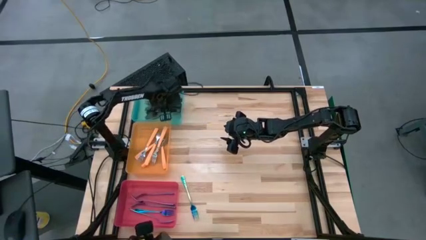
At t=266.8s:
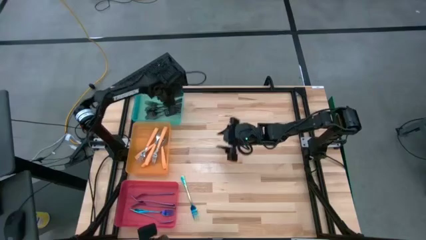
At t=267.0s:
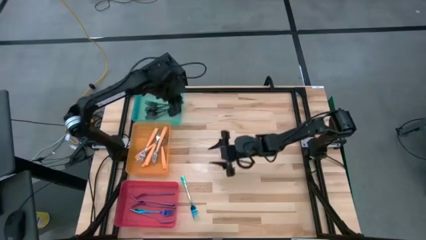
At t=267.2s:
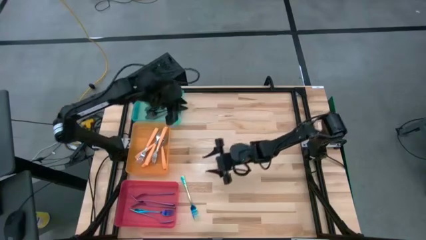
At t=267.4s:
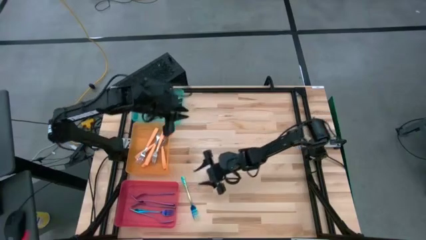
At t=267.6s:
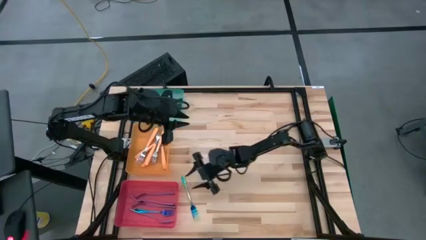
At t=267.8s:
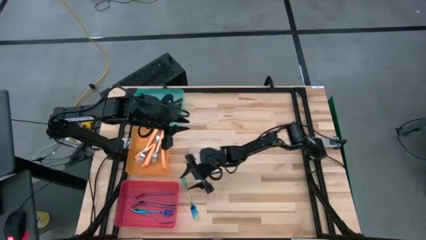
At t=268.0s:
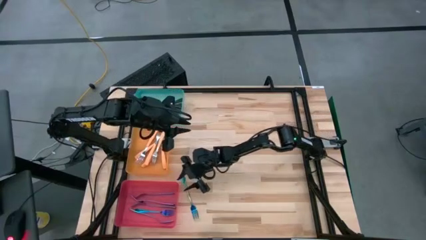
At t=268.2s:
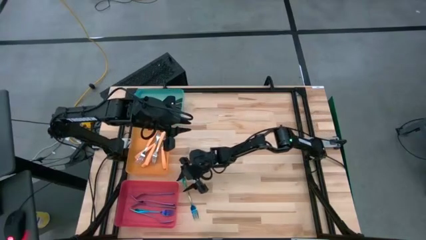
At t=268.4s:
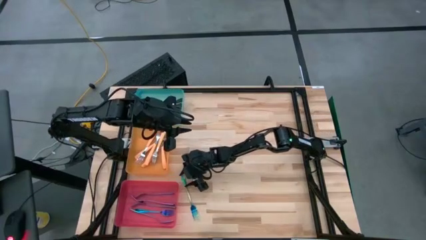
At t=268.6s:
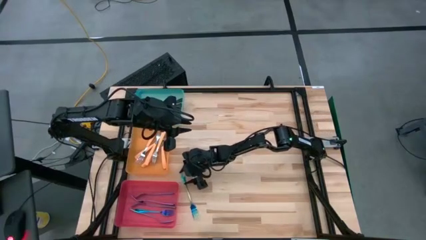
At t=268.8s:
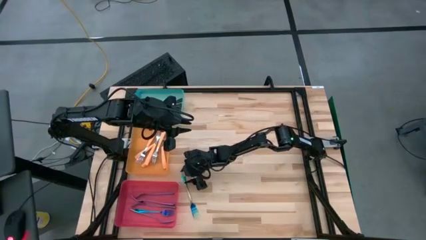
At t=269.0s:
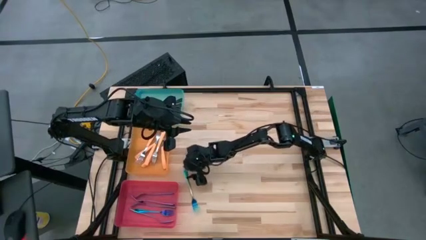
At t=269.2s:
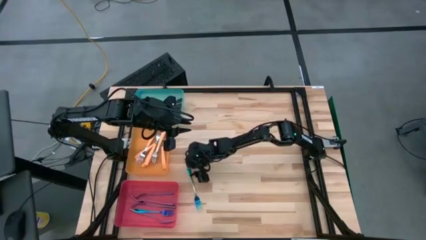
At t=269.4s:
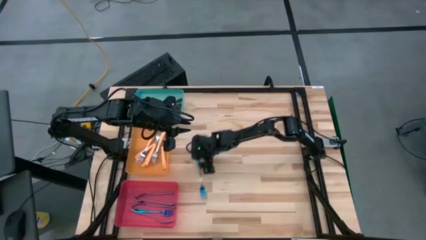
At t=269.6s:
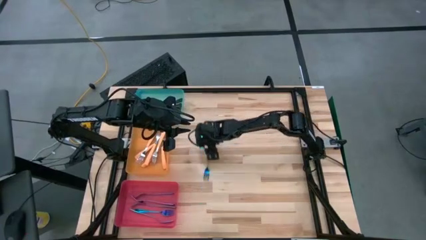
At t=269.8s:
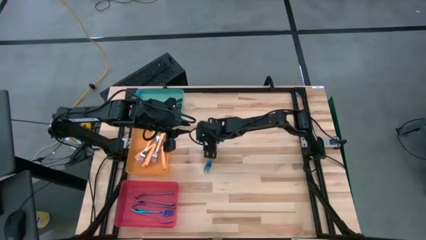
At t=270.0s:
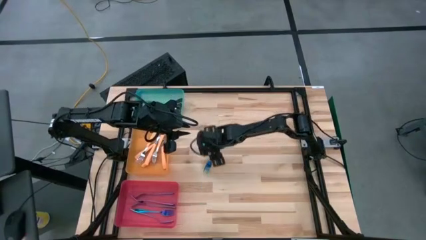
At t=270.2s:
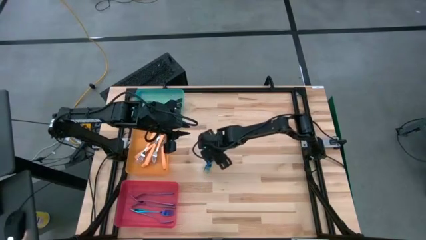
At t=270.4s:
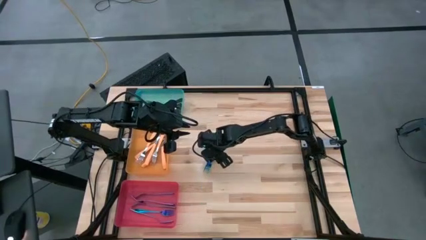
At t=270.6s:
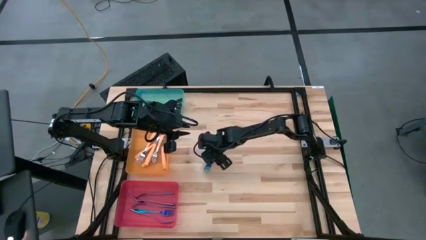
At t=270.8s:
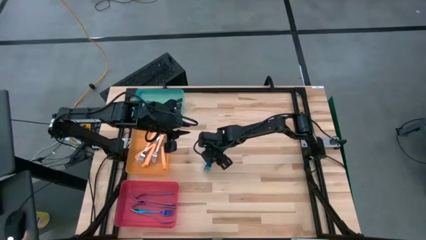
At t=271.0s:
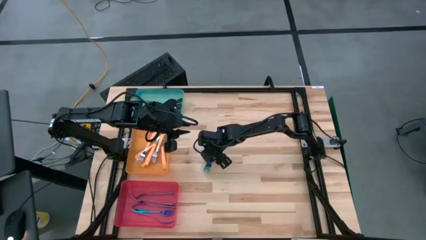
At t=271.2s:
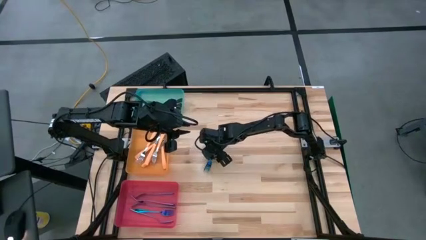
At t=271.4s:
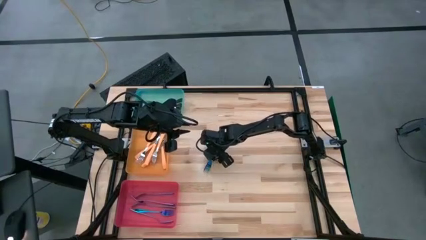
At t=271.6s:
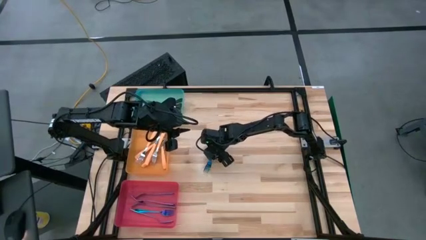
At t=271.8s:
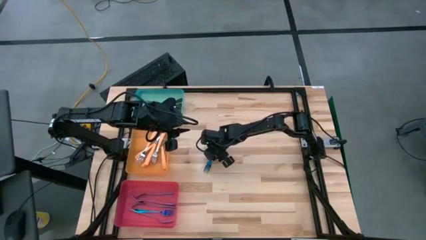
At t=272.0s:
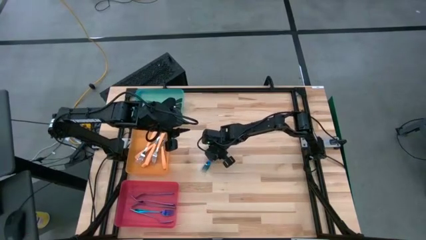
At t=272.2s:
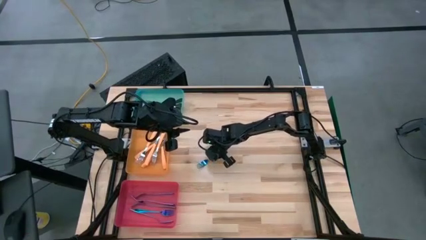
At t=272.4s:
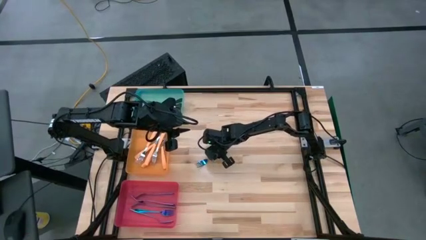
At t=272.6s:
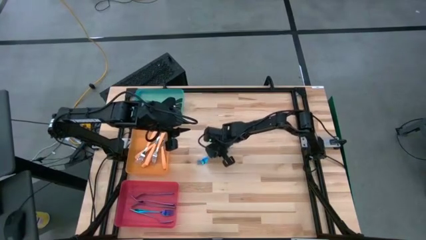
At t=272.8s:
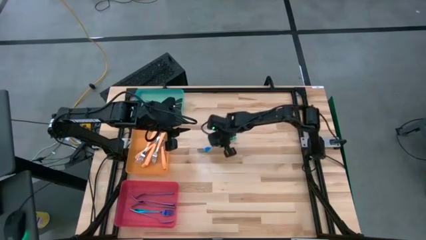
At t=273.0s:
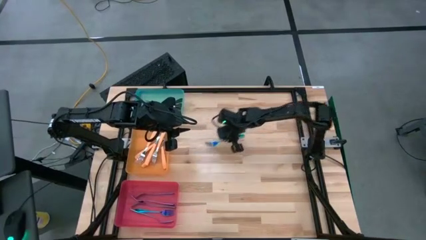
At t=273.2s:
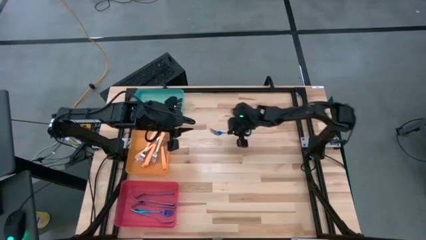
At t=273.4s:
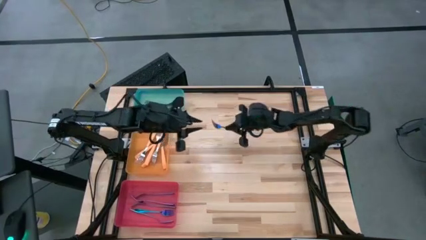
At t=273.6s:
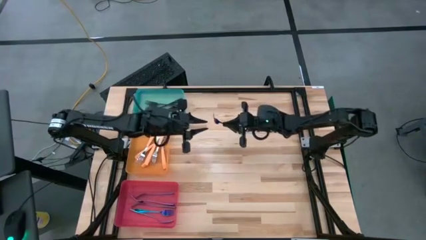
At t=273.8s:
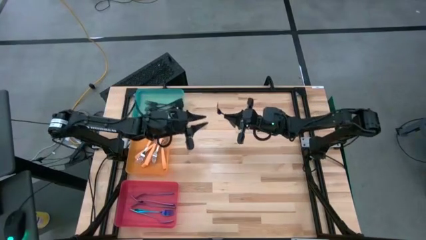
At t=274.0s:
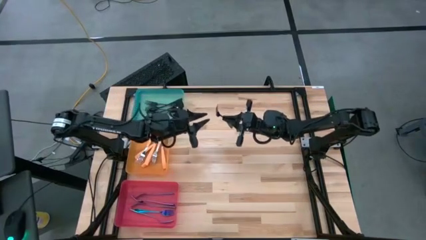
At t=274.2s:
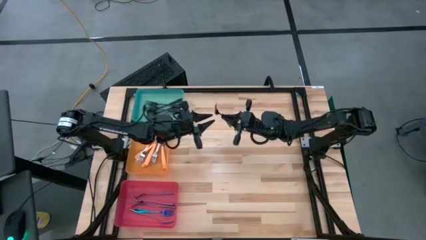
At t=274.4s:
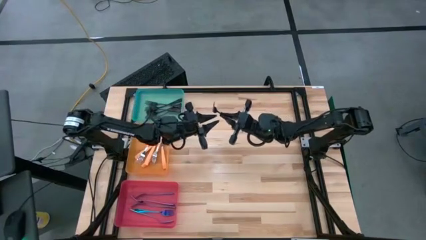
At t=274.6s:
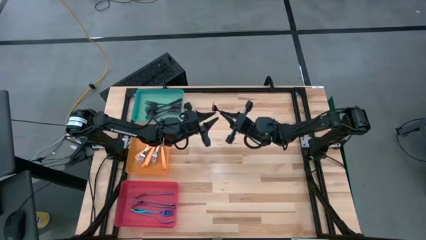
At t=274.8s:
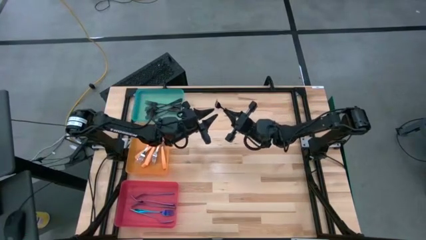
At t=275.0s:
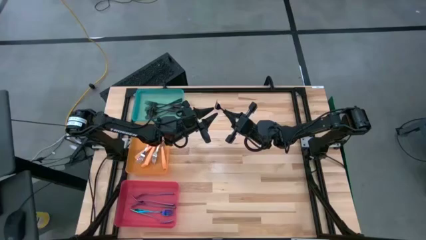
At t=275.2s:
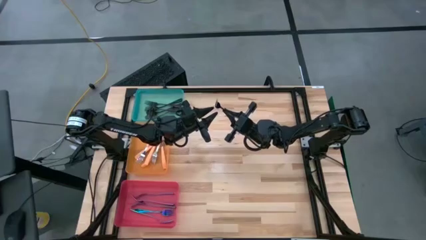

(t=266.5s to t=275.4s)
Task: Sort silverware by color (type)
Put the blue fork into the pink bin

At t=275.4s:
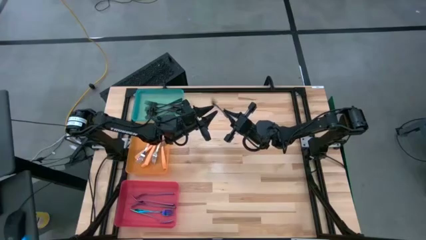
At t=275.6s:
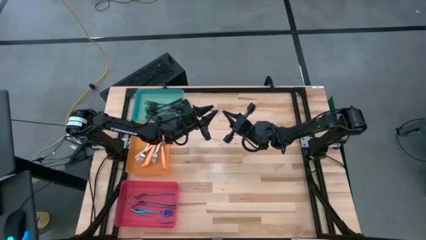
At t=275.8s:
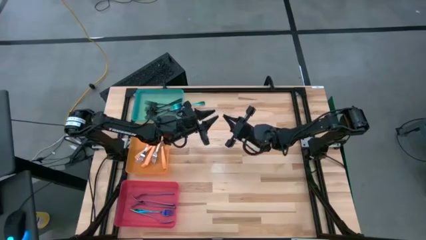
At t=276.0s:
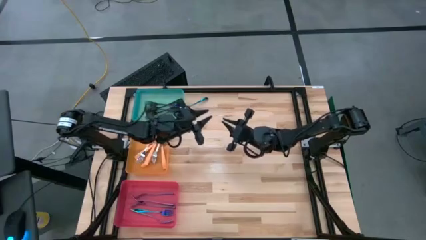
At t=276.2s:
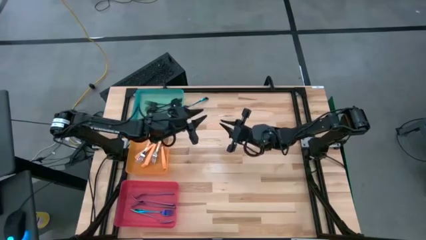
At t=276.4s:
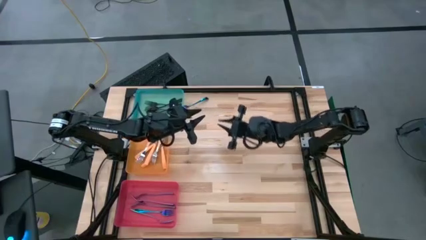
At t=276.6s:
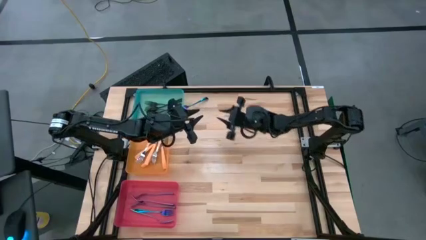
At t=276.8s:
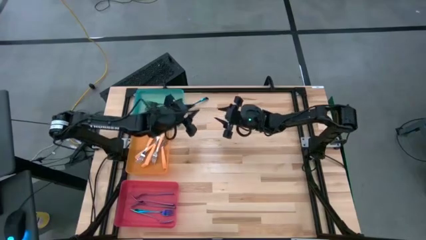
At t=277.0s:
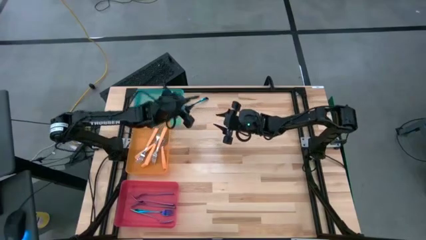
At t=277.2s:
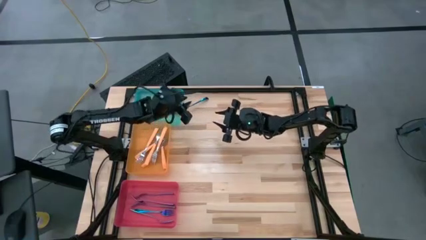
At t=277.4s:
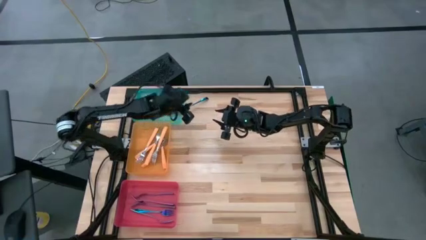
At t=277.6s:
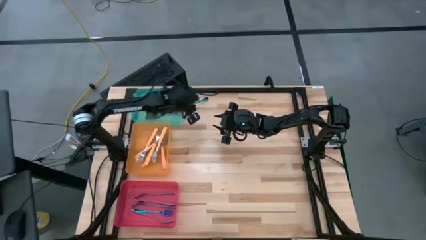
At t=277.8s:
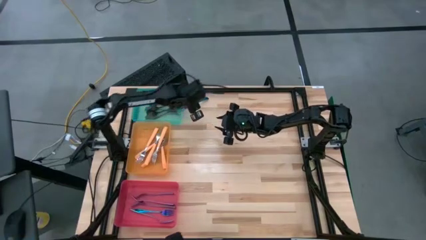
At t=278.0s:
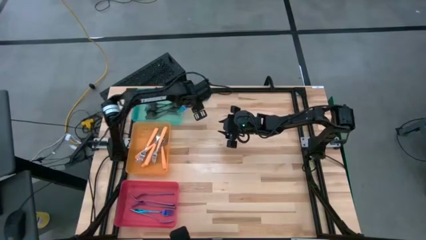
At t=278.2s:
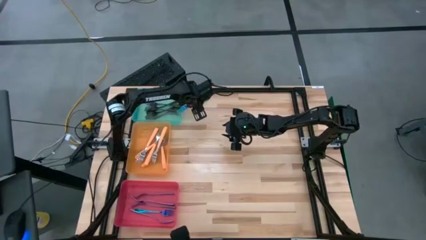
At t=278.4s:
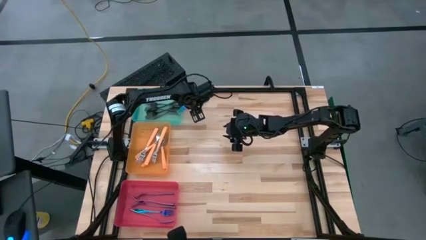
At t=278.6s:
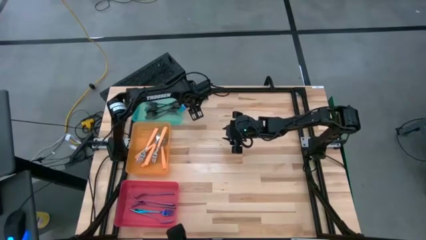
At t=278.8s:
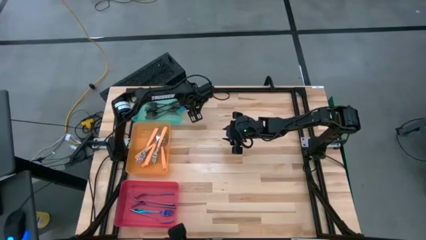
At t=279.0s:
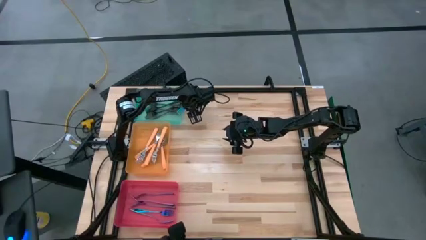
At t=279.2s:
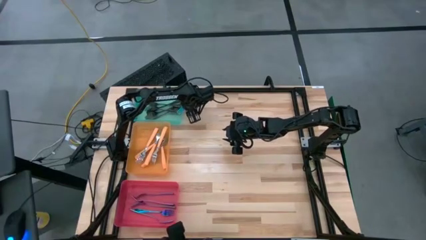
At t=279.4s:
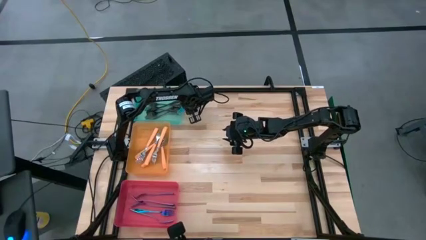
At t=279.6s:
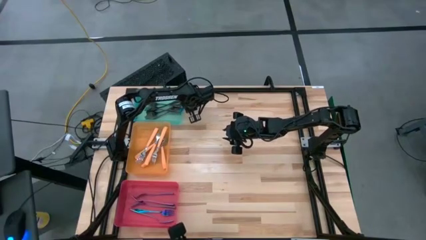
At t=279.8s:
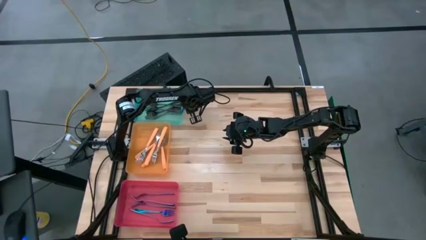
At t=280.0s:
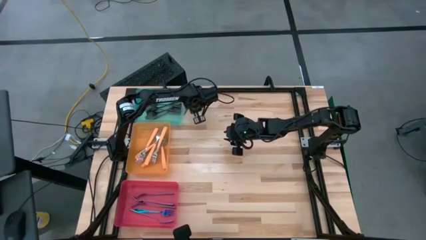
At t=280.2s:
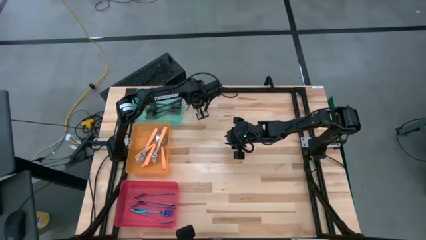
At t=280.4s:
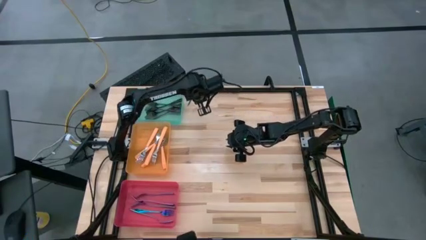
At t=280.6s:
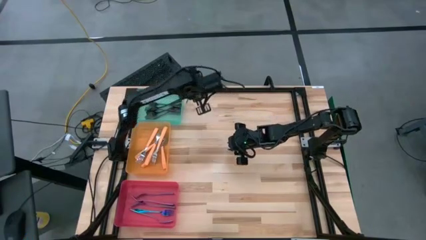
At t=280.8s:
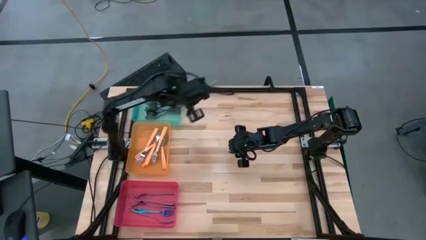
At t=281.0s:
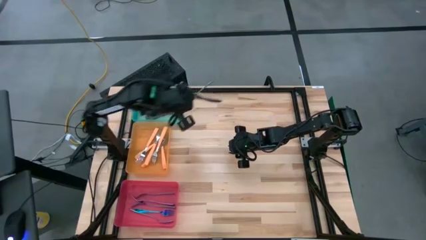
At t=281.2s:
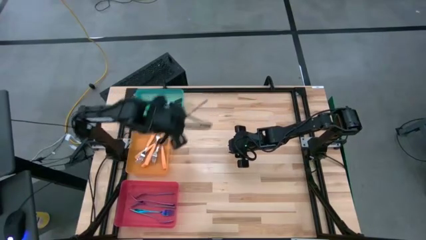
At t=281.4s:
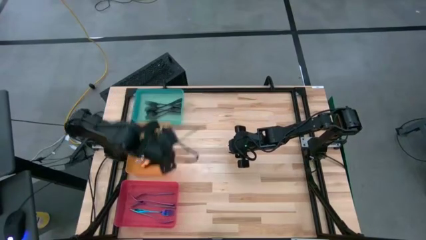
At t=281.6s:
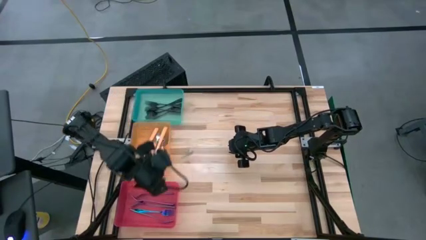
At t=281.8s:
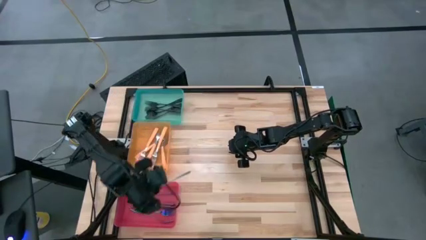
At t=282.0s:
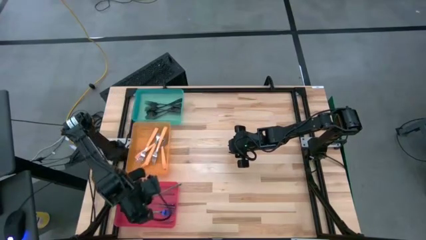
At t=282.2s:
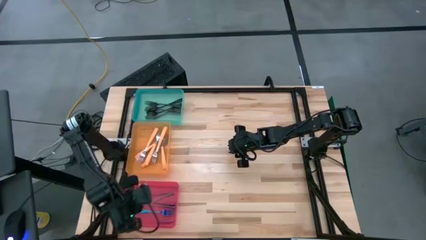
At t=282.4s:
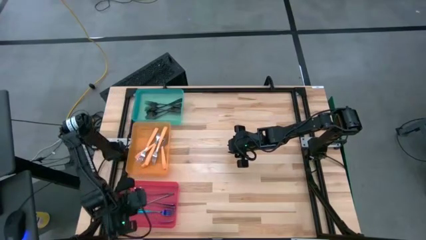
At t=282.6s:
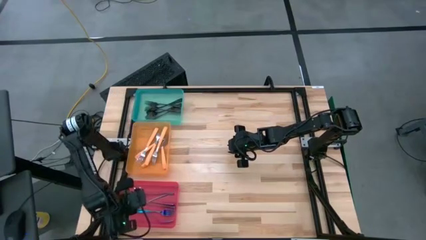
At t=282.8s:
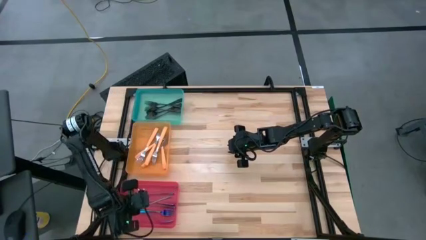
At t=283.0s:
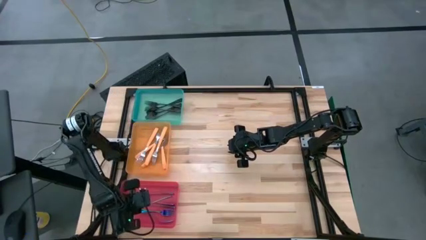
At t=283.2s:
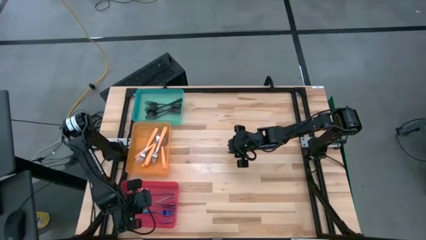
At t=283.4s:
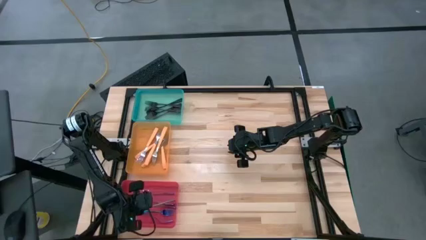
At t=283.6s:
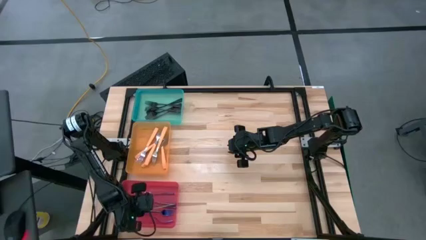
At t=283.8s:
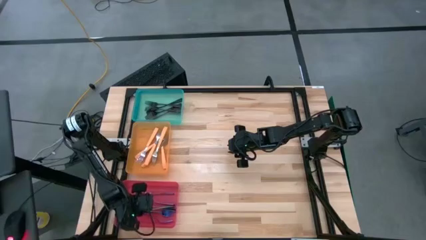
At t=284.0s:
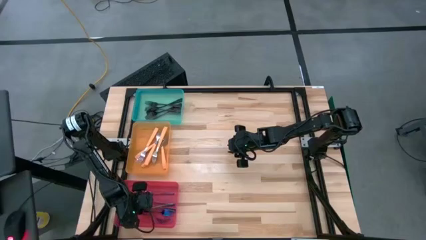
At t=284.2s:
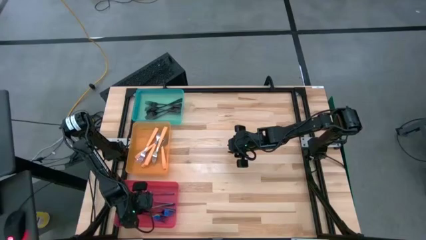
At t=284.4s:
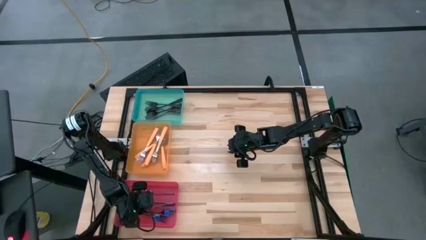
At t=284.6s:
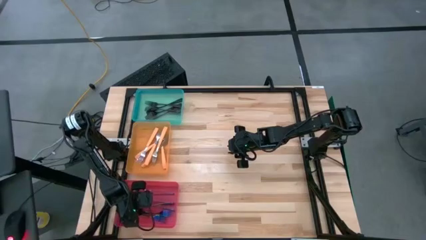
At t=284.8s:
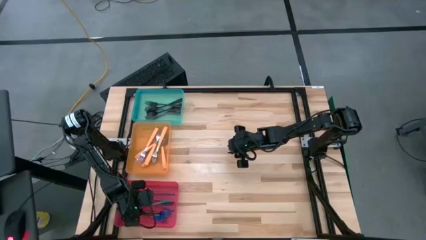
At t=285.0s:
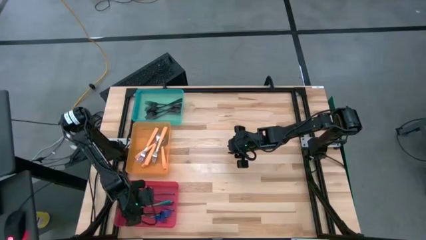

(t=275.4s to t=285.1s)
Put the blue fork into the pink bin
